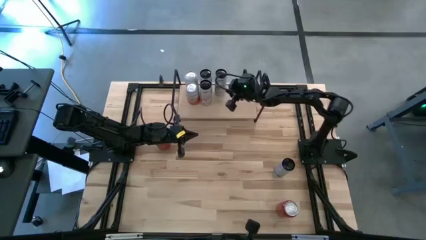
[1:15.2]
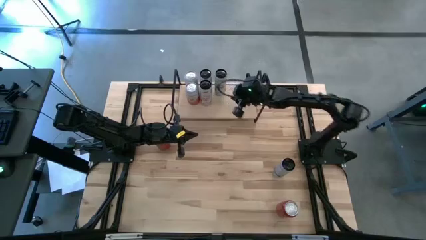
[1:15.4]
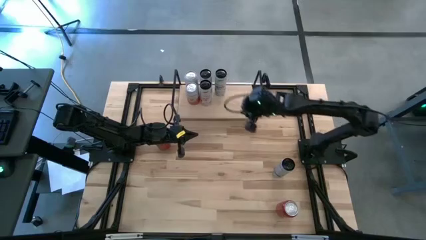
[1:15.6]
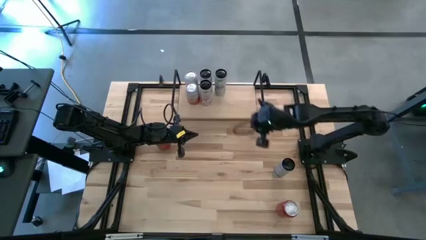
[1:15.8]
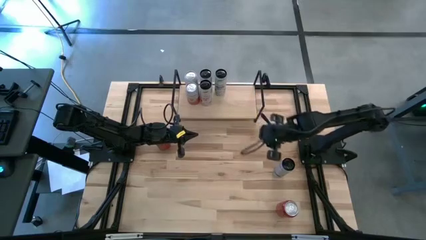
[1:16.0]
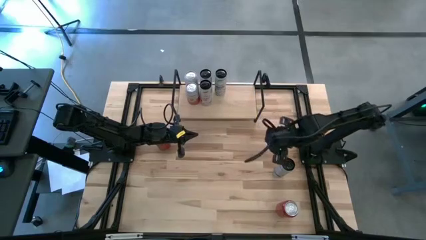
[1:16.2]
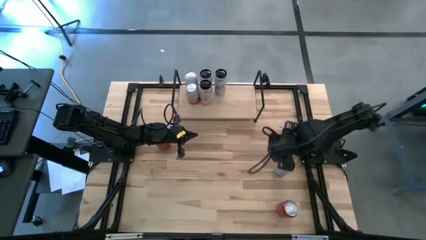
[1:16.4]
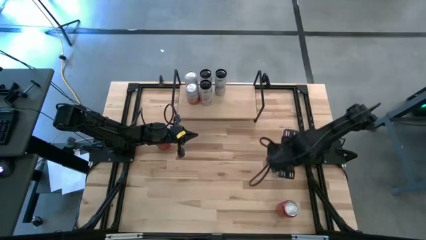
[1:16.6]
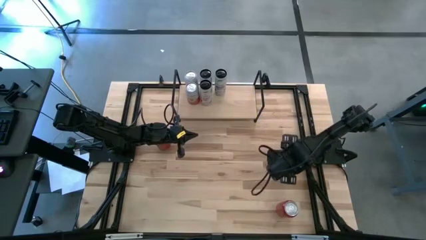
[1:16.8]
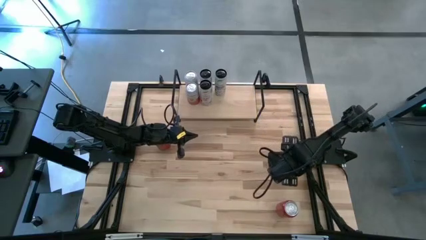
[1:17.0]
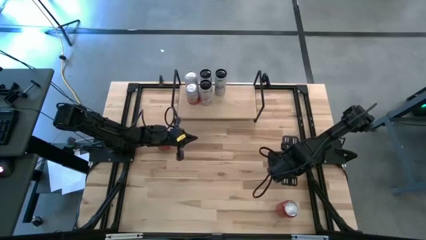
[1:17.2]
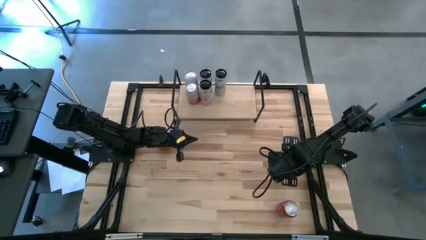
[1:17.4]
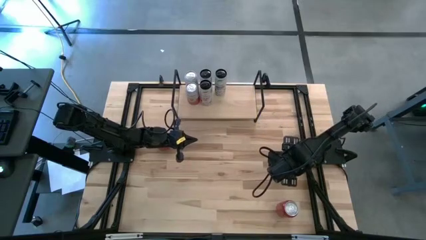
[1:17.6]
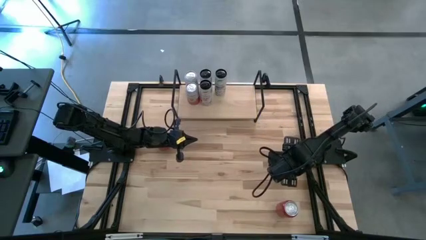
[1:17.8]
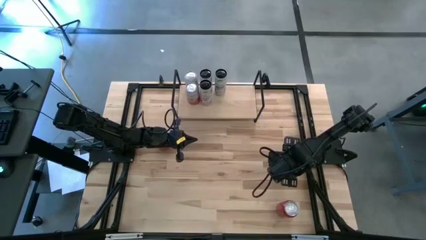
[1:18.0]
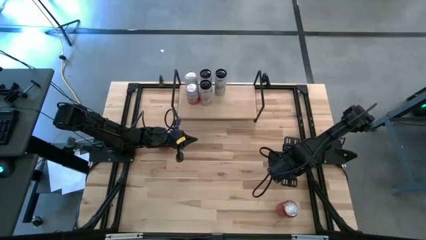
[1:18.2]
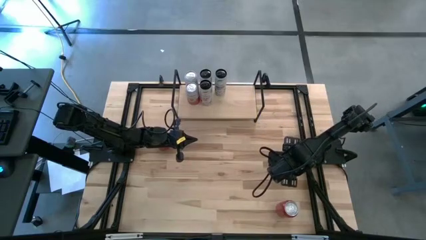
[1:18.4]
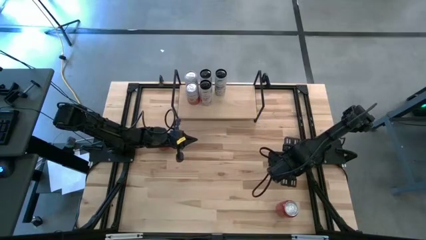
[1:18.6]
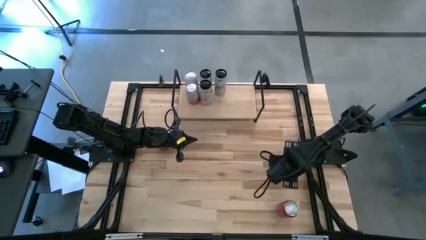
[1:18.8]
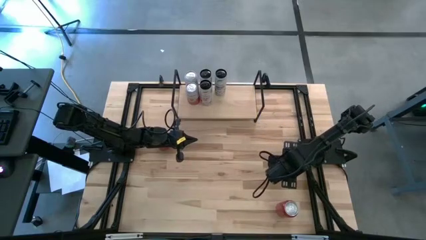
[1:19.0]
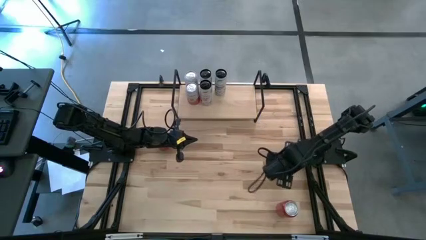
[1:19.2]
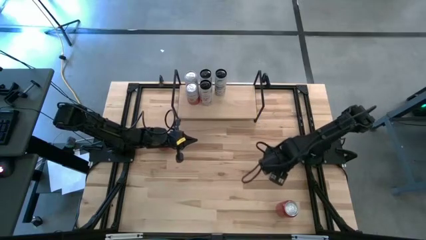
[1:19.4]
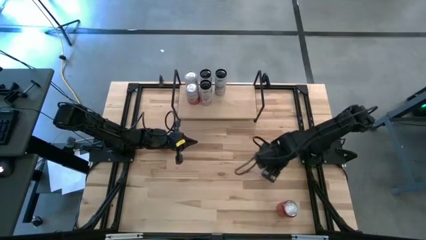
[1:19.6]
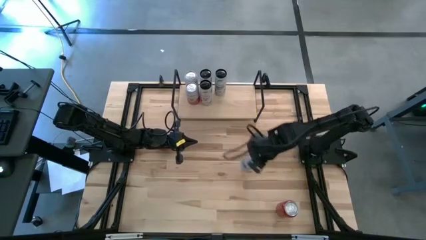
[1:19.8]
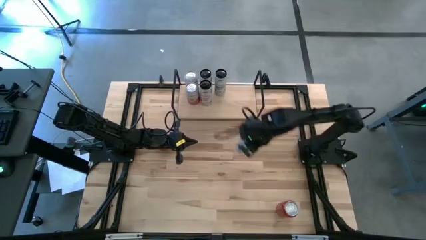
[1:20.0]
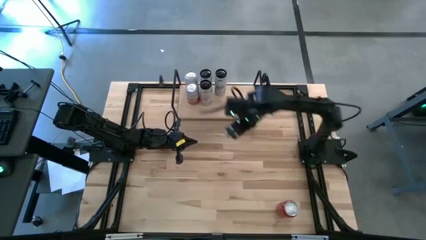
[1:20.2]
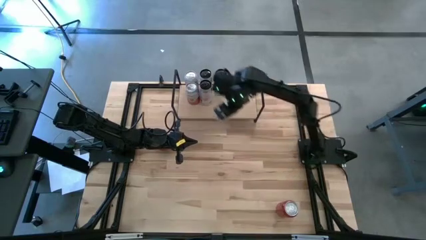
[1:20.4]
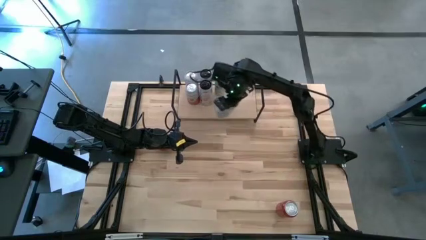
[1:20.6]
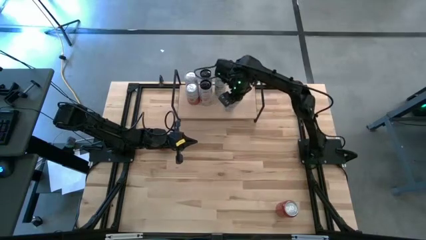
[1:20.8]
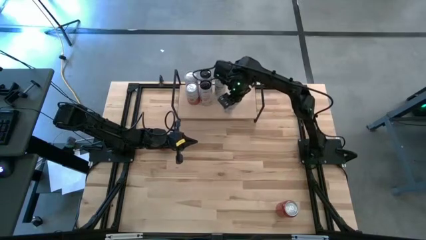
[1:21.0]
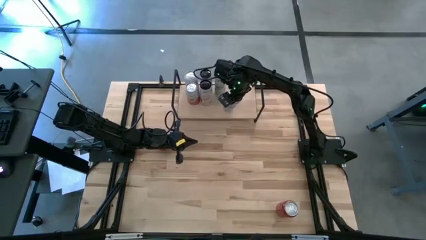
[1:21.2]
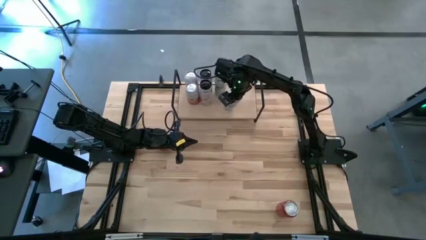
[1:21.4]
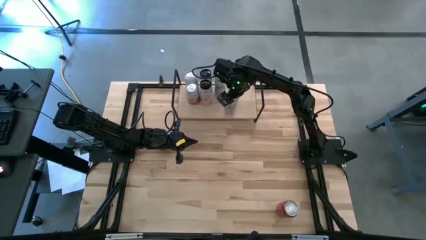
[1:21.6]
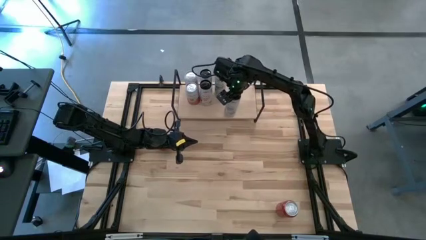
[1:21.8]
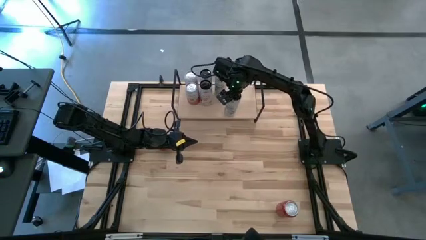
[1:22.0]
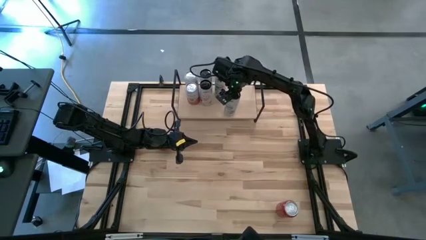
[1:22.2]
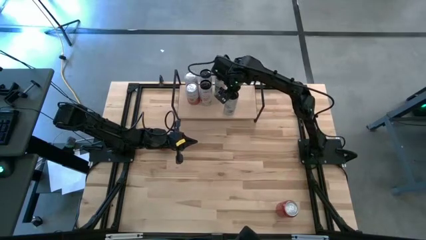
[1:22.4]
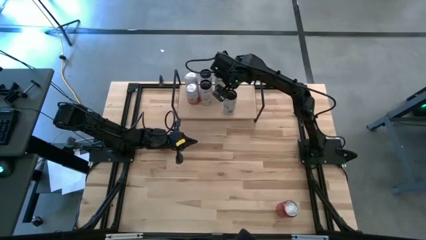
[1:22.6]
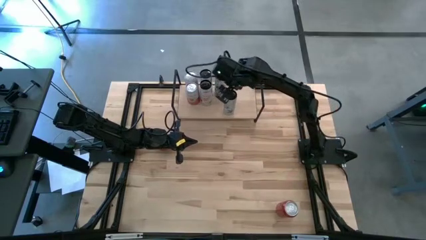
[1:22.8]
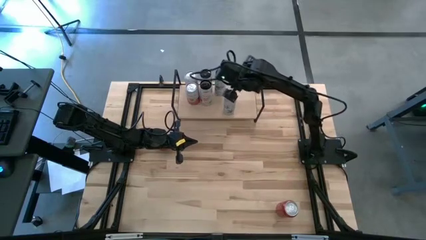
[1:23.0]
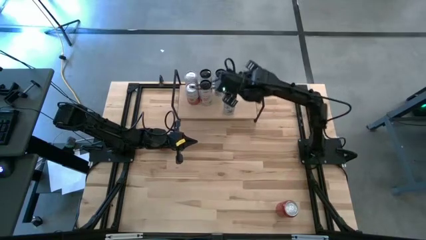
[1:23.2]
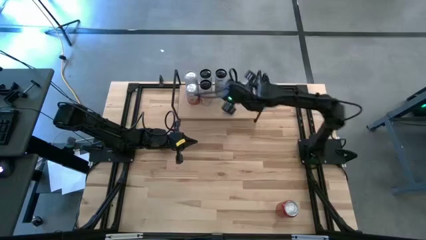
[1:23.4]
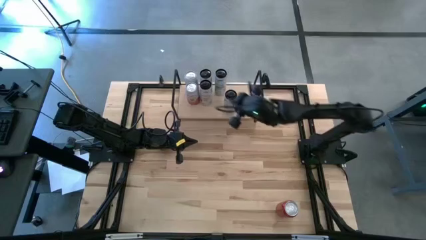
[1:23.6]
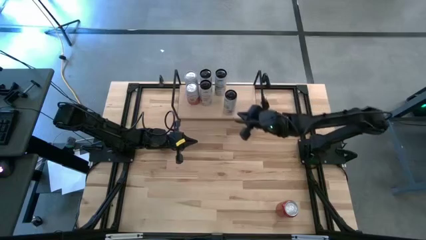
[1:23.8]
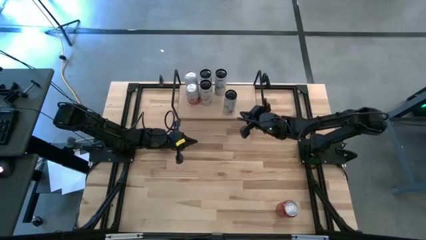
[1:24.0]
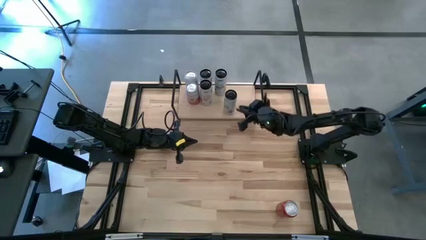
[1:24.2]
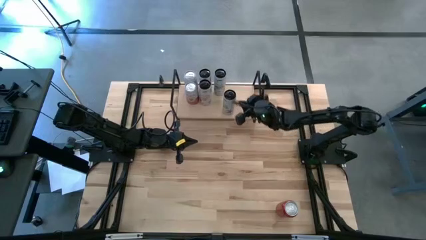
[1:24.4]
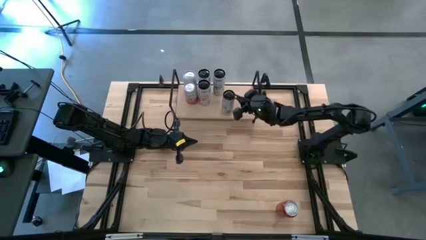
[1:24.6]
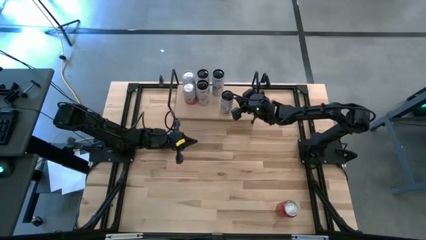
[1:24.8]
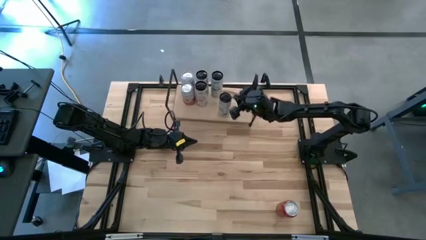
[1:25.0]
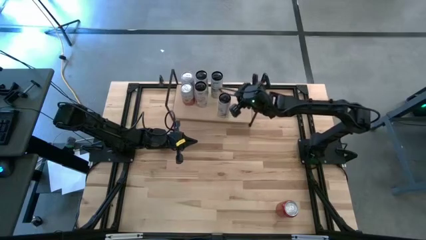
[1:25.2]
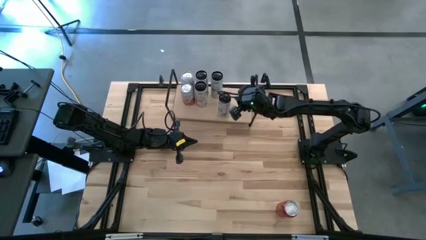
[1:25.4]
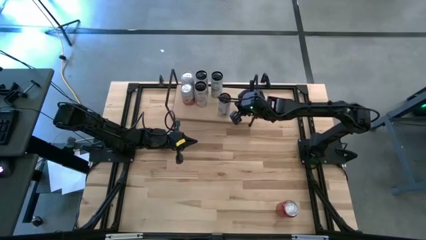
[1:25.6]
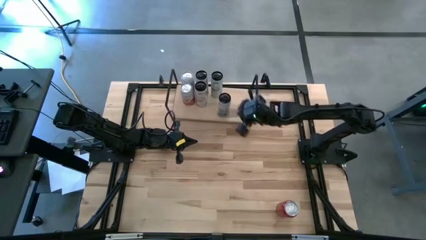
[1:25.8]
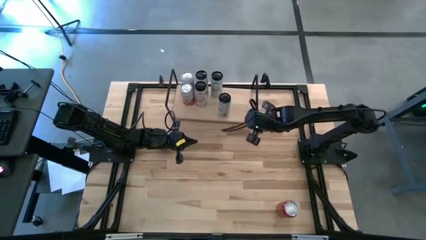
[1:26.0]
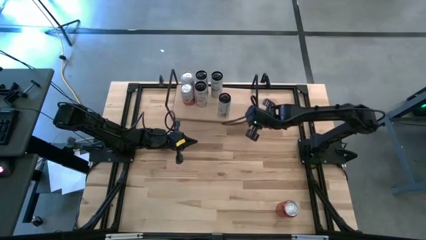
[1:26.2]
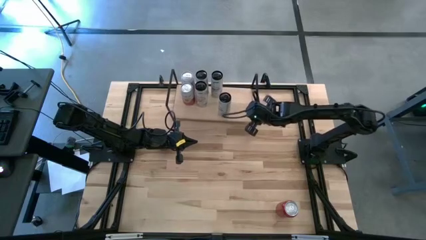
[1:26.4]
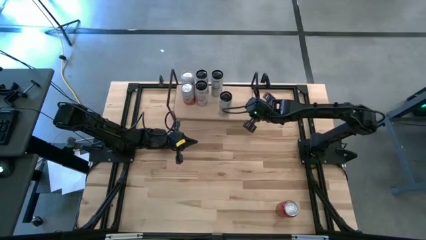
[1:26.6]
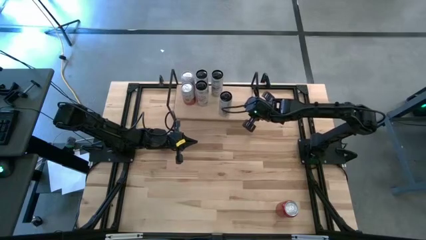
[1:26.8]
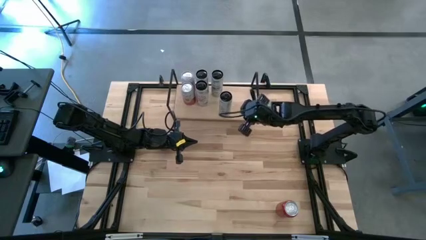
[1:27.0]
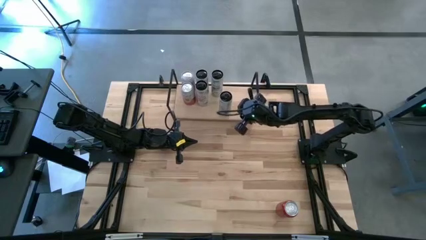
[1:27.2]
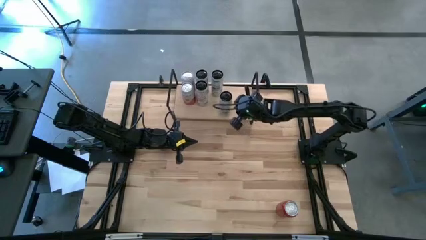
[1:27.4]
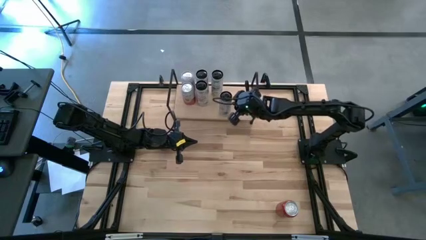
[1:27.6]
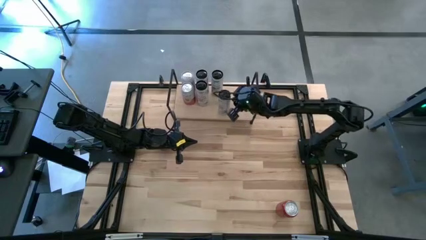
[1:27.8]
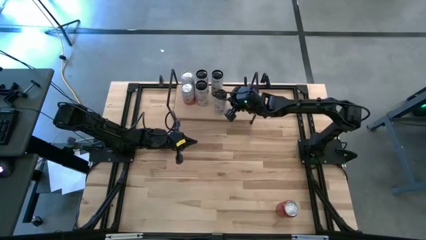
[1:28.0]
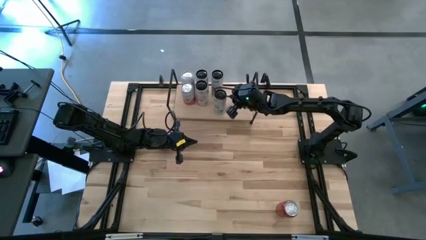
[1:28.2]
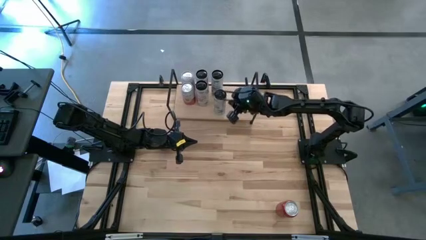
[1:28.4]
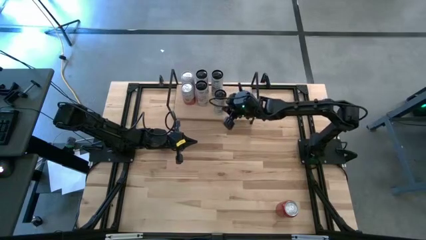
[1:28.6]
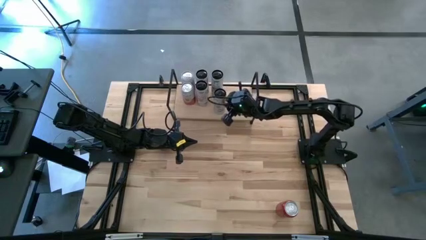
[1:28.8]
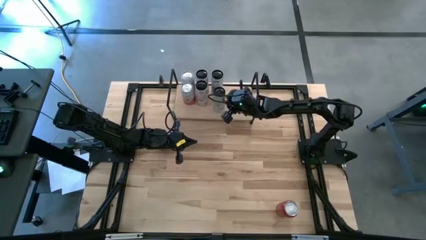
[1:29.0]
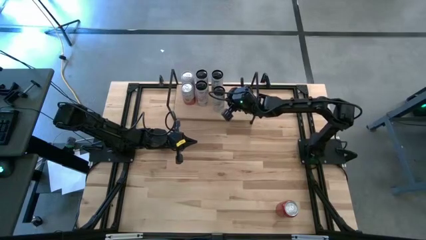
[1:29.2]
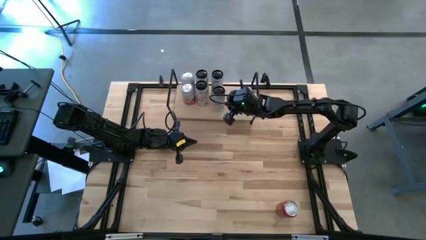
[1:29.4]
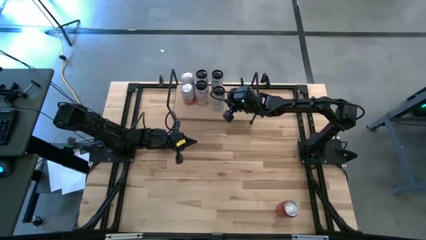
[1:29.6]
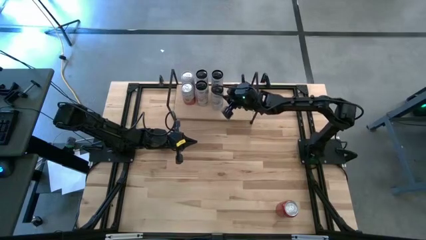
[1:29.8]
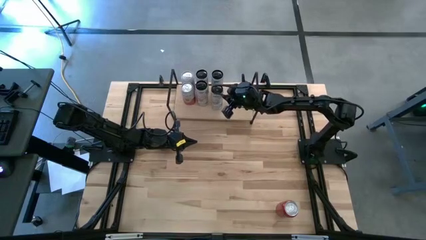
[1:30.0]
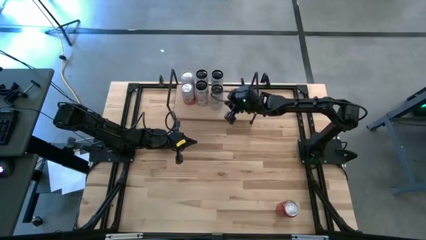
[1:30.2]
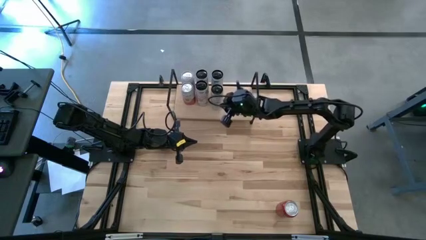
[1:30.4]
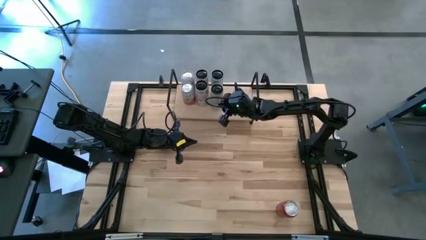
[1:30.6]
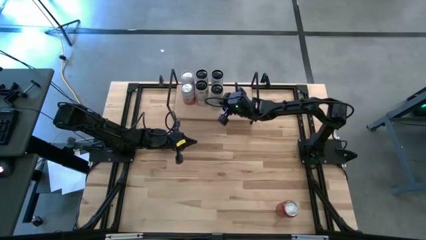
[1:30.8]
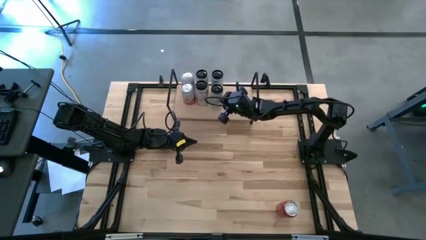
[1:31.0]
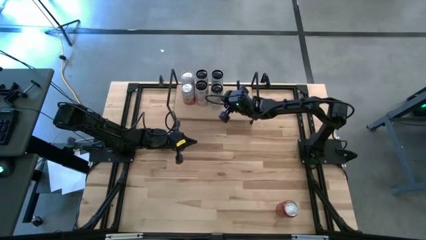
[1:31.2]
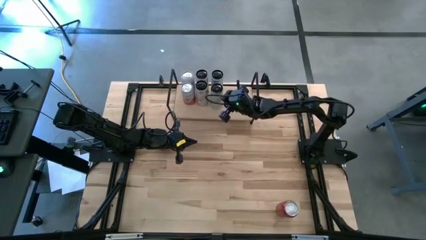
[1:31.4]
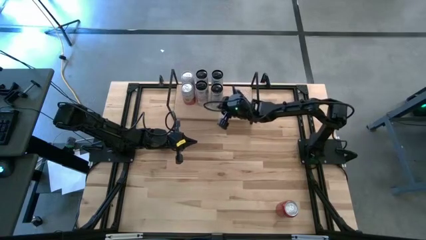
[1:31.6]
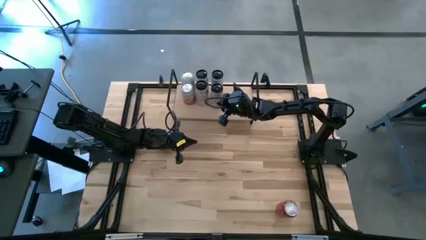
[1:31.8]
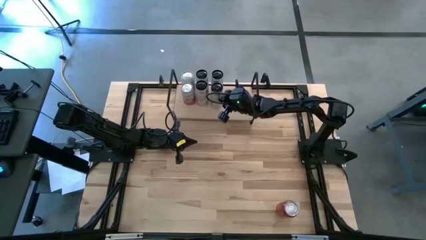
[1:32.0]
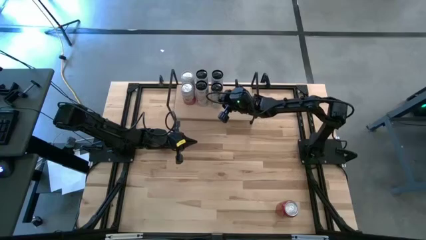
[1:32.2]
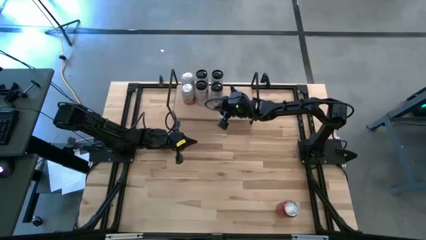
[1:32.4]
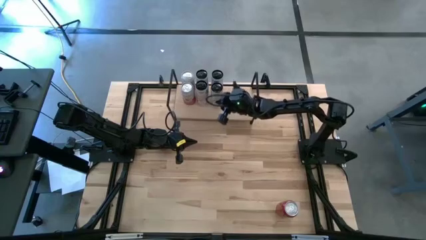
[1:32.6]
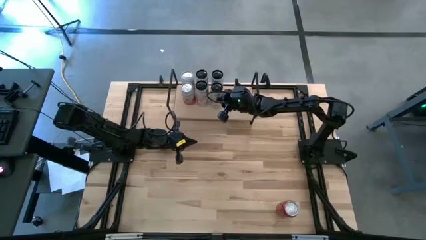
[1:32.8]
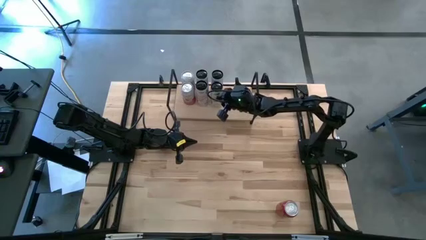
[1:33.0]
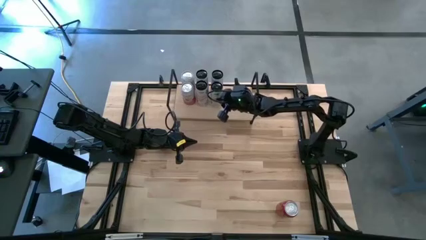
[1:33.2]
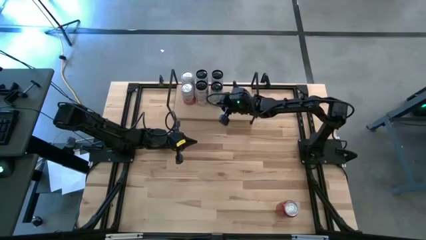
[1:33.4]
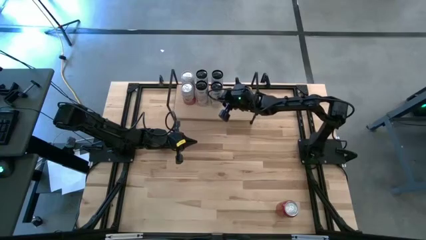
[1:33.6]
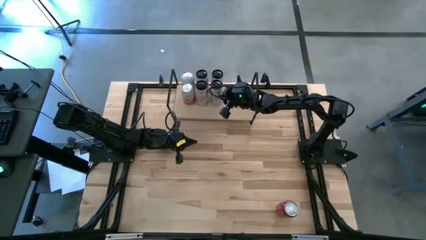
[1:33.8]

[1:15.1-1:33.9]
Task: Place canned beverage on shelf
Put the white blue soda can on the shelf aligned with the other white blue soda can
